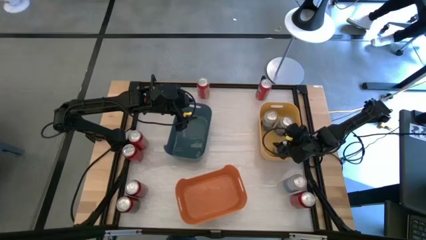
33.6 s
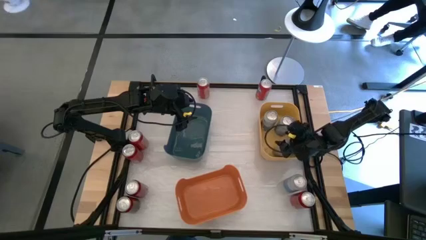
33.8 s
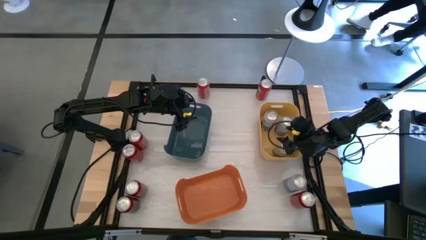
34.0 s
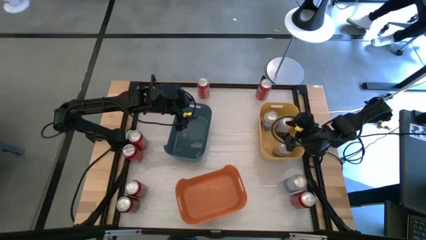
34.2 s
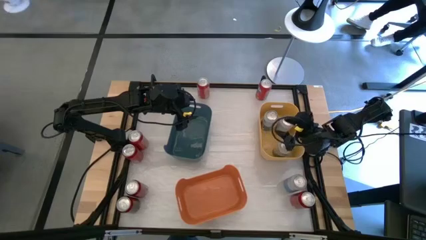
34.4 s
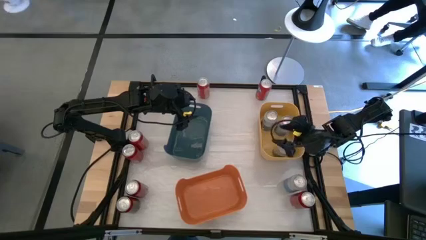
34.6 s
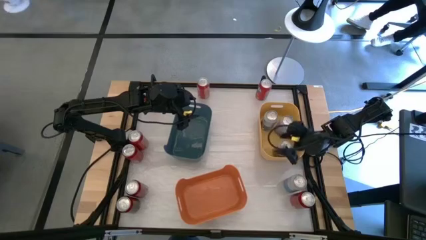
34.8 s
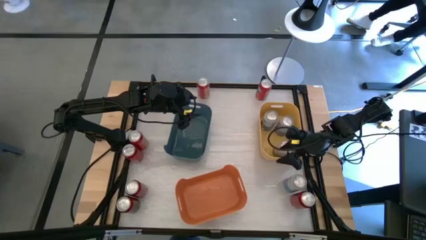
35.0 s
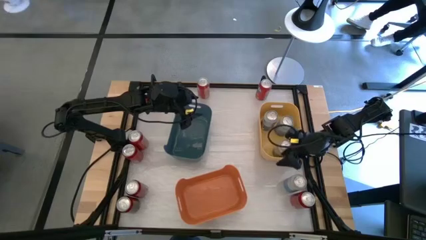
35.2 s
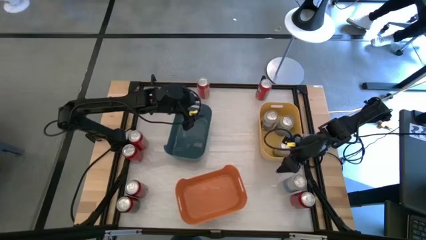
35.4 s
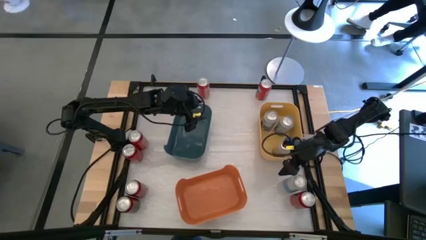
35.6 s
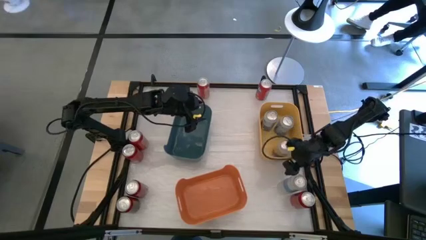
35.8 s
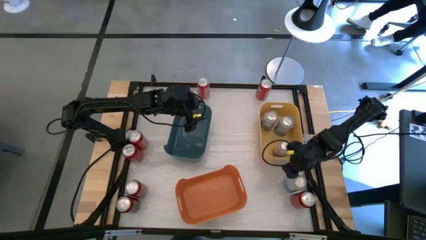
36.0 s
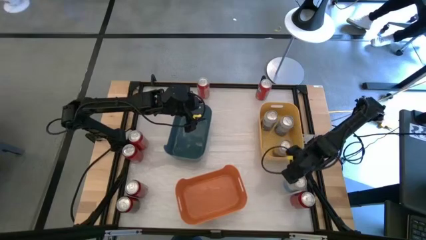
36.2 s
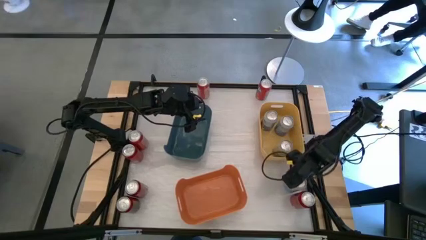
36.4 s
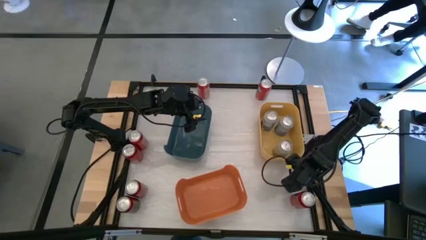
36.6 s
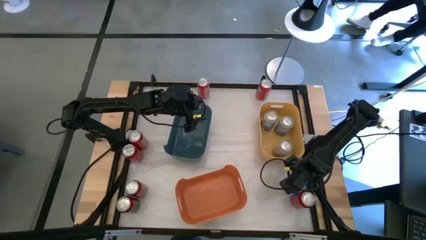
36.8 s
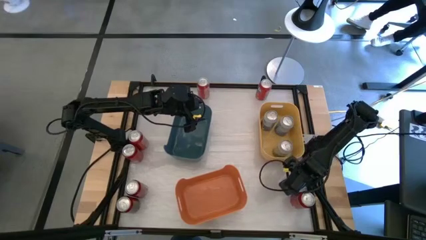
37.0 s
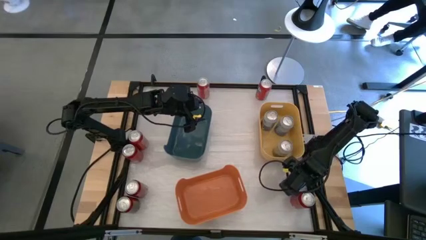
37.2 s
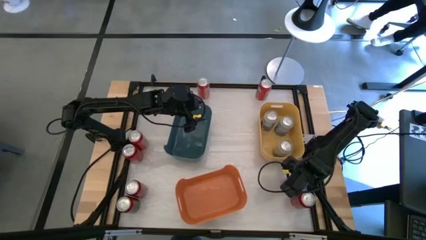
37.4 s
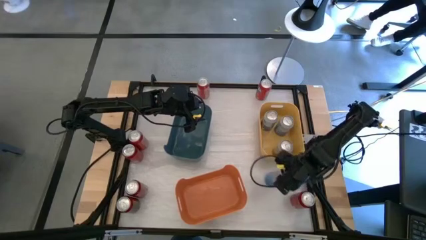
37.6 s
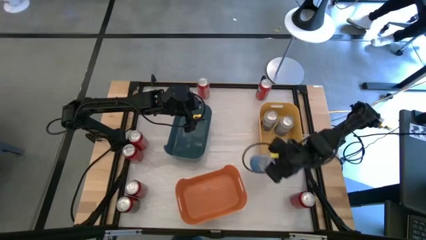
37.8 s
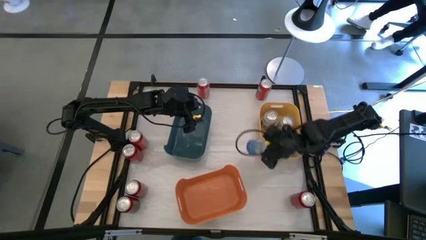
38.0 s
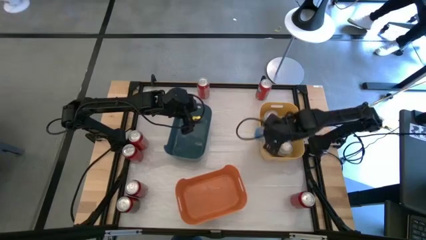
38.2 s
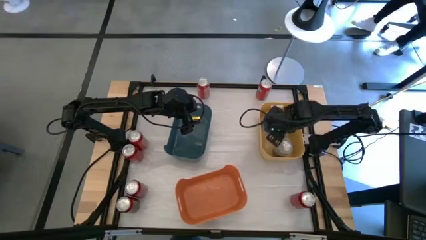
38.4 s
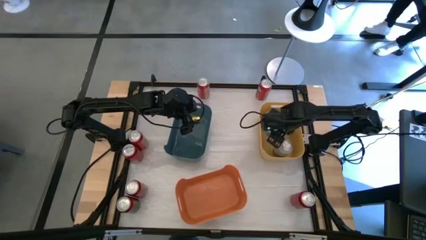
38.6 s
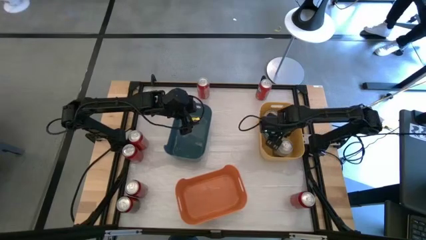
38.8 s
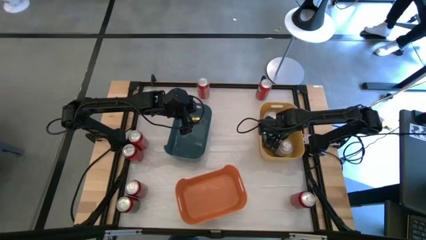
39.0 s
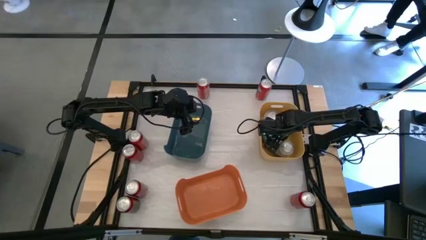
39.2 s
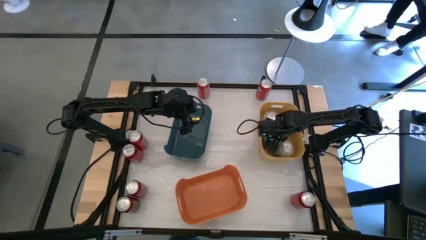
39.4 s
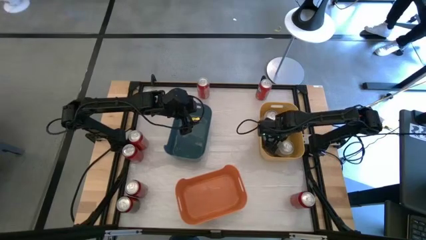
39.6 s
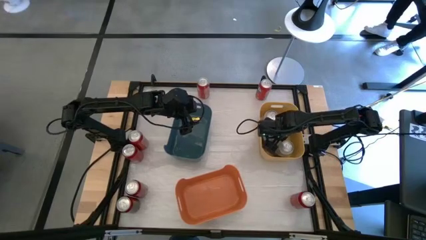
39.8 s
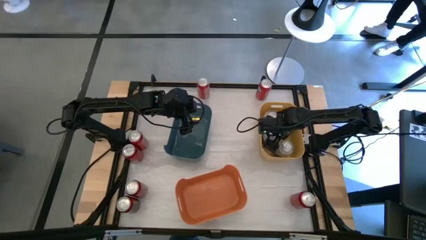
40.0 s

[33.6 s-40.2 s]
Task: Sort soda cans
Put the white soda can into the yellow bin

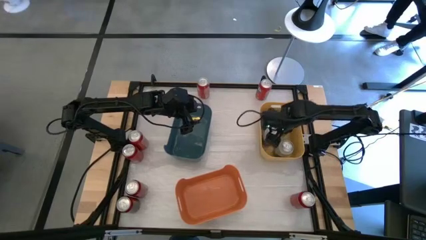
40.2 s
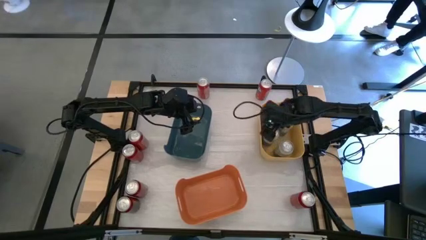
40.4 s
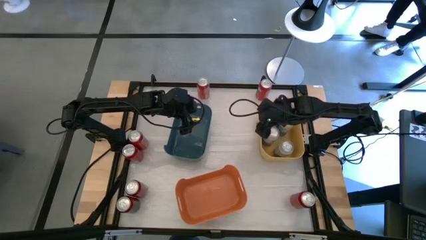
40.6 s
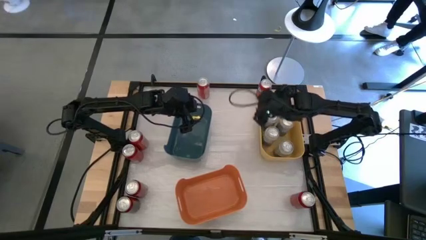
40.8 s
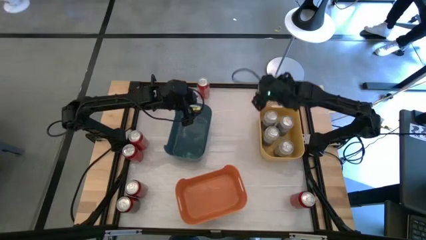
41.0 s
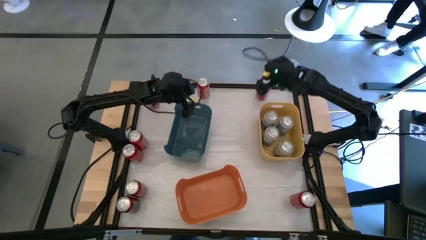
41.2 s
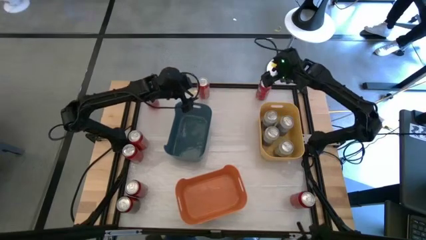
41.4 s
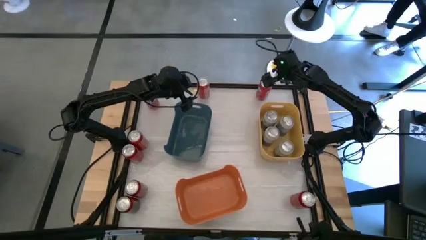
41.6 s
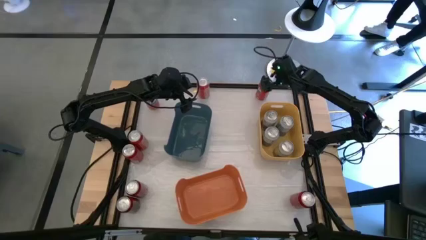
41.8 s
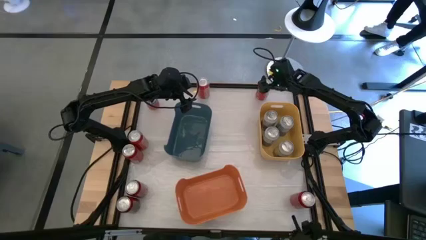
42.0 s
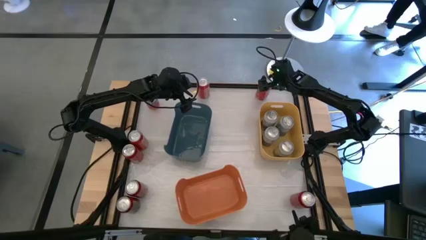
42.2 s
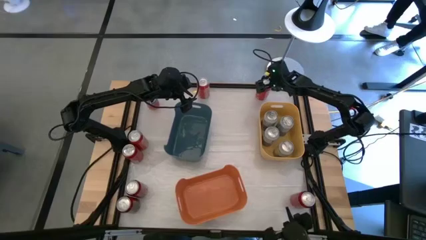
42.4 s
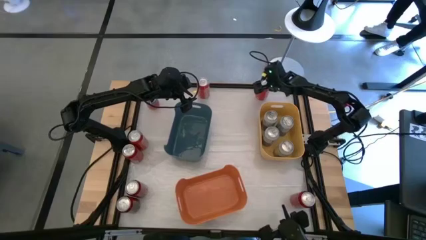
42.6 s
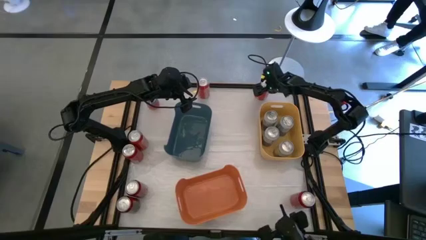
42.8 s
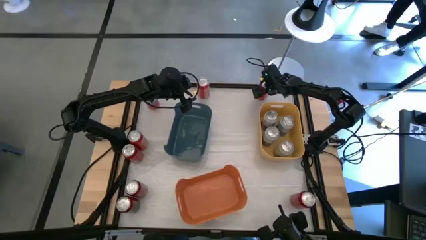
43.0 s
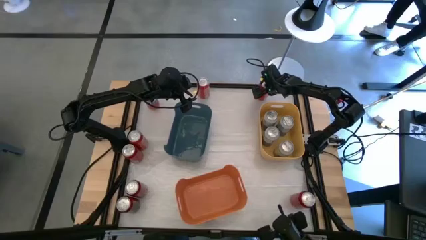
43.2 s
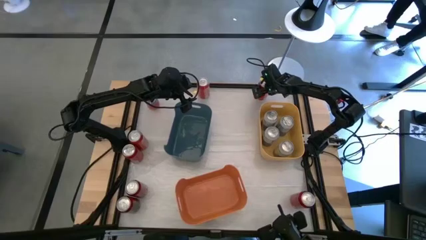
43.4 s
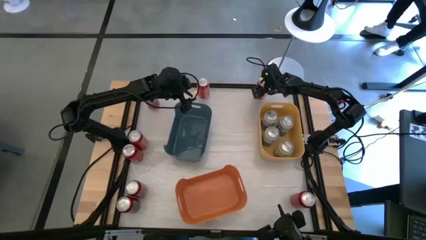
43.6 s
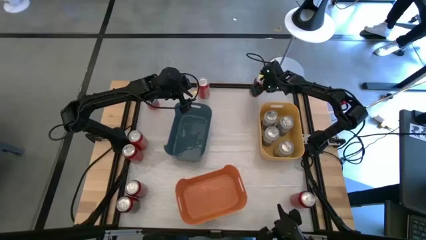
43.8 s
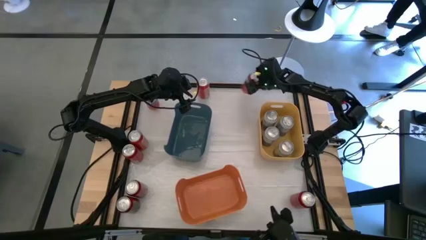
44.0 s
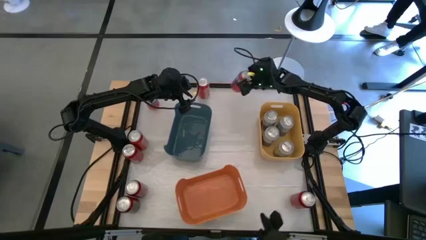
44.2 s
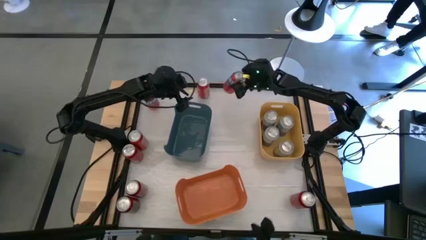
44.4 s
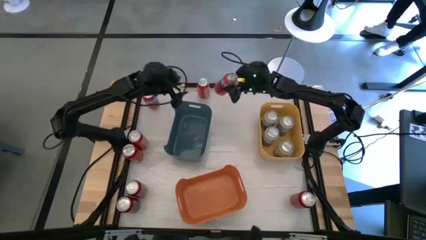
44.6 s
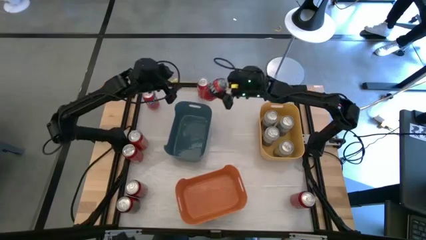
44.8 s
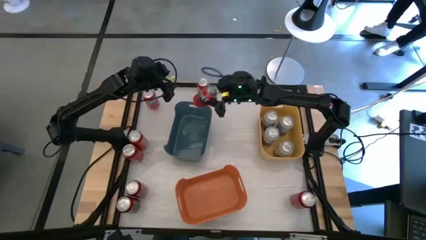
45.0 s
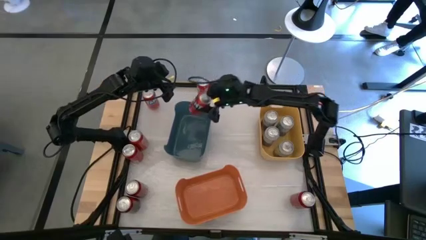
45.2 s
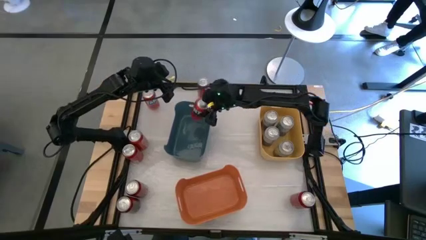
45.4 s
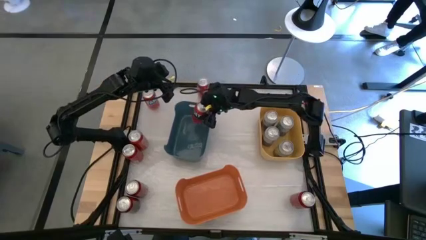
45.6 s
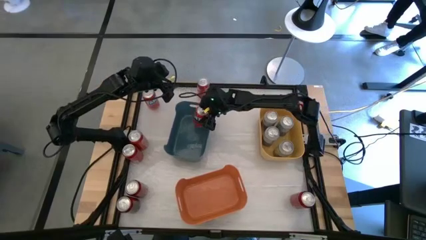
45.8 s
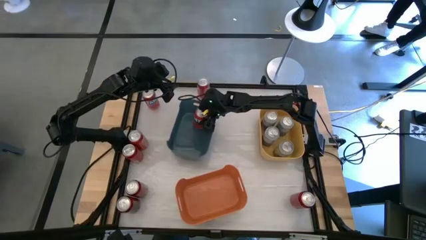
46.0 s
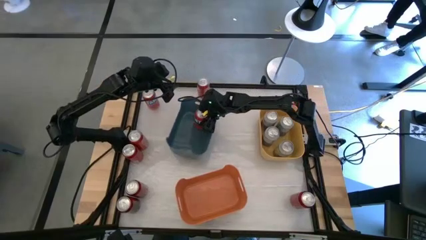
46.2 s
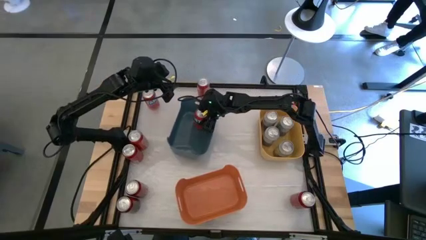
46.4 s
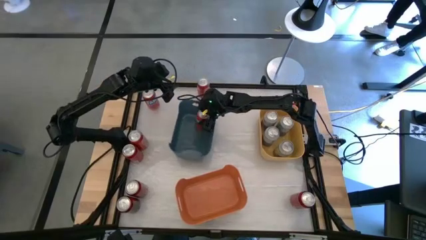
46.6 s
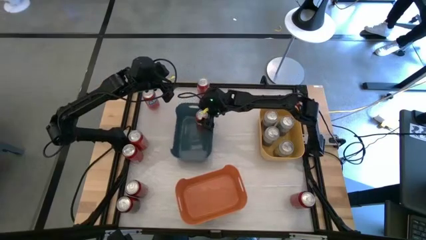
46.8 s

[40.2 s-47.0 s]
Put the top right orange soda can into the blue bin

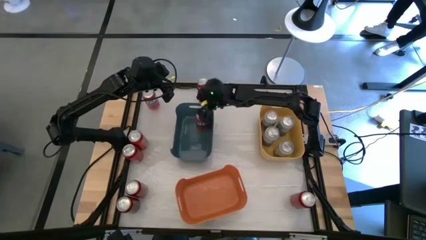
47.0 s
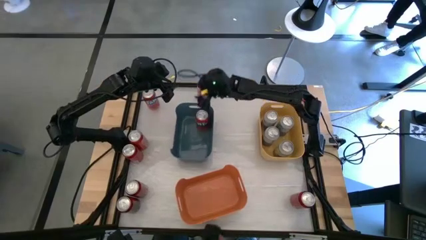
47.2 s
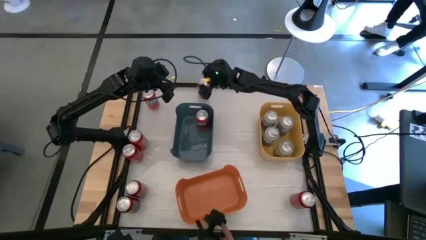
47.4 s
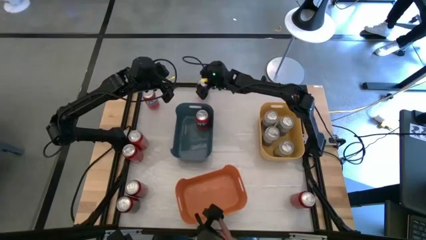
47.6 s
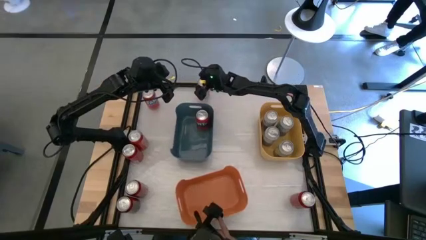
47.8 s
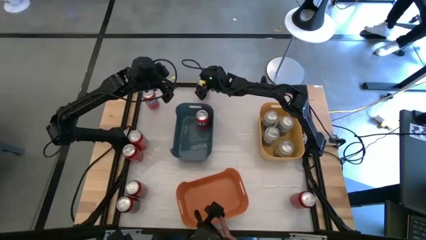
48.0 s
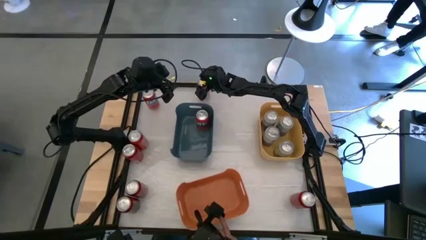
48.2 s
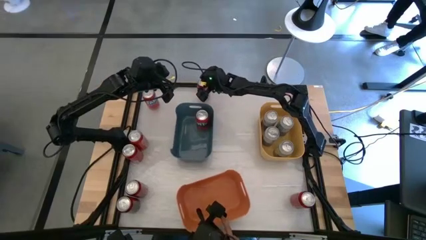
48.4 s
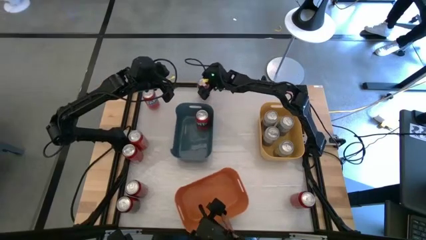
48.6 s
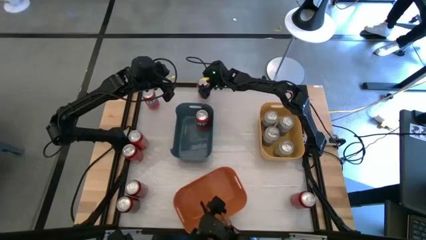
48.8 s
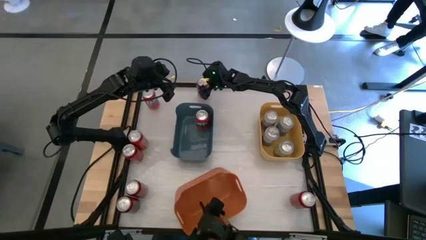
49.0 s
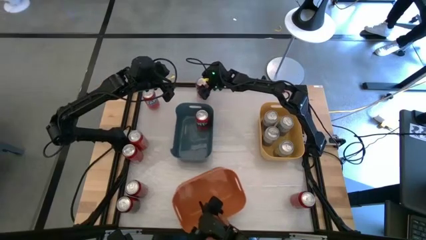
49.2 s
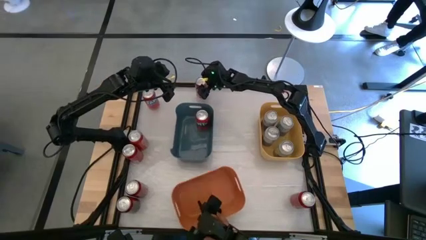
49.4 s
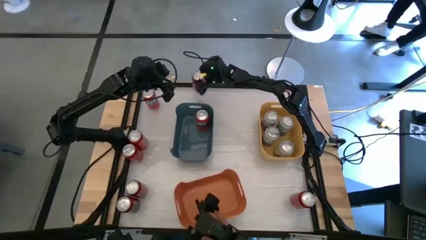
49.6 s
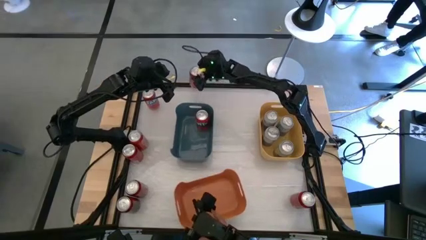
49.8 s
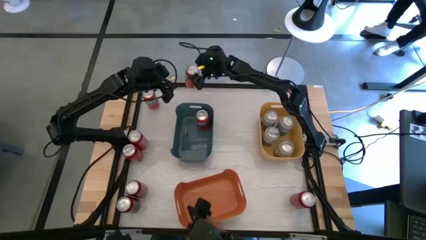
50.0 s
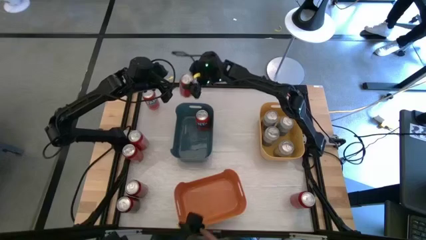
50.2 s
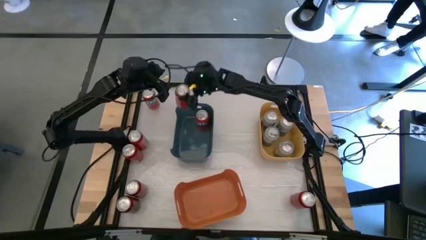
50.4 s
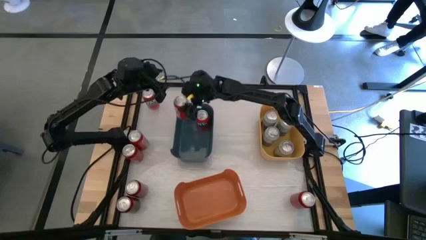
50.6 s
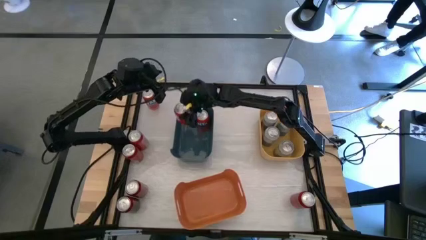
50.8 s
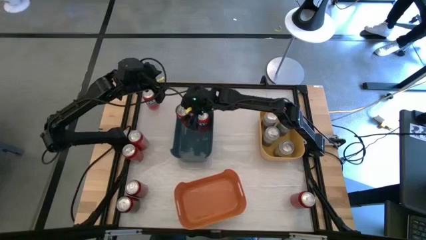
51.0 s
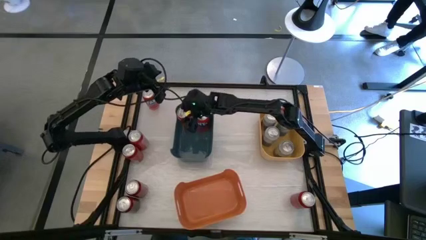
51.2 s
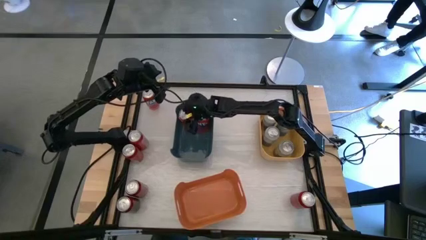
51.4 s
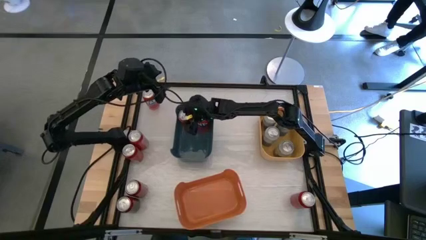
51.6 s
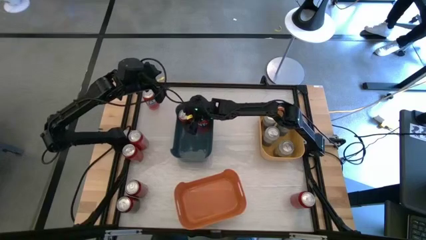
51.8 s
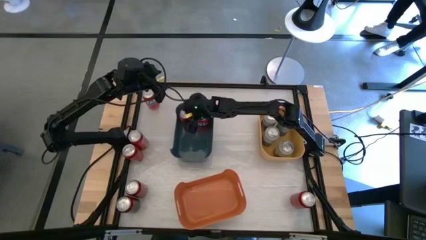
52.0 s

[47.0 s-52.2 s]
Put the top right orange soda can into the blue bin
